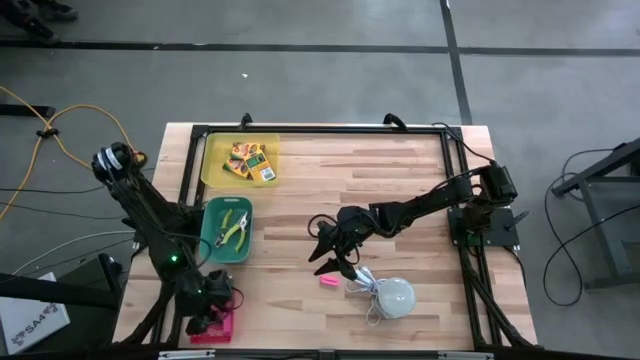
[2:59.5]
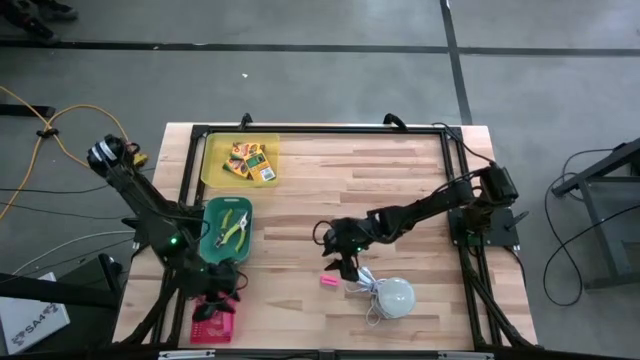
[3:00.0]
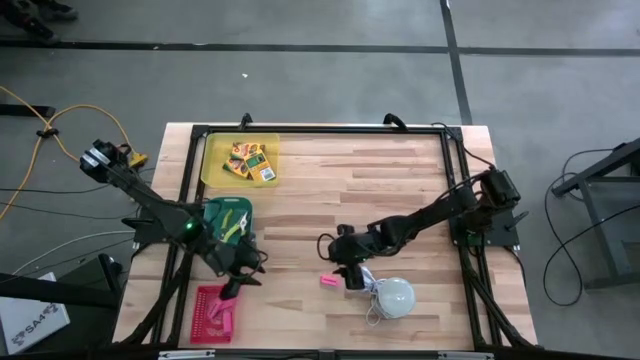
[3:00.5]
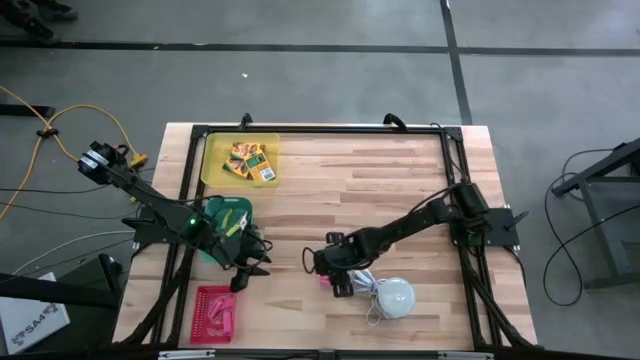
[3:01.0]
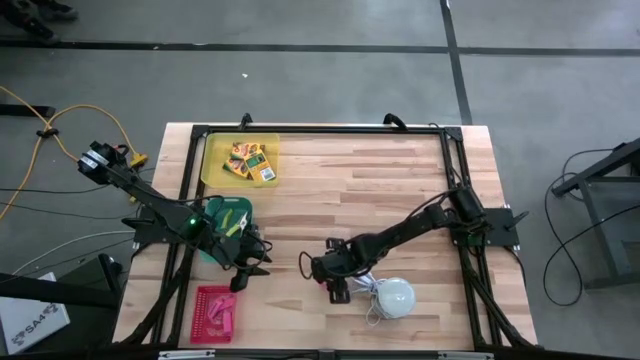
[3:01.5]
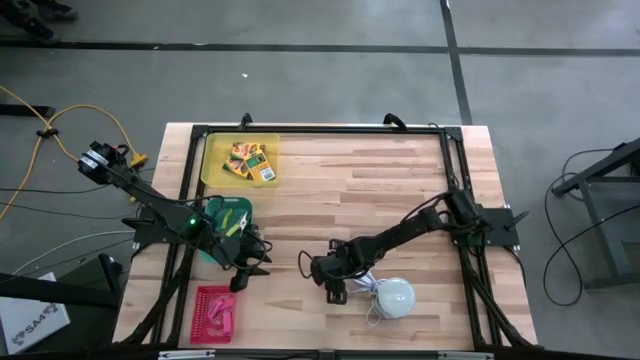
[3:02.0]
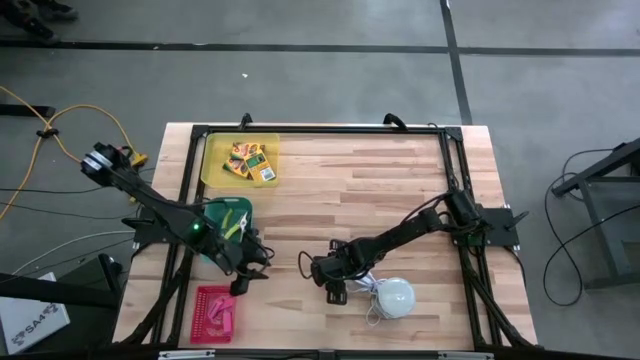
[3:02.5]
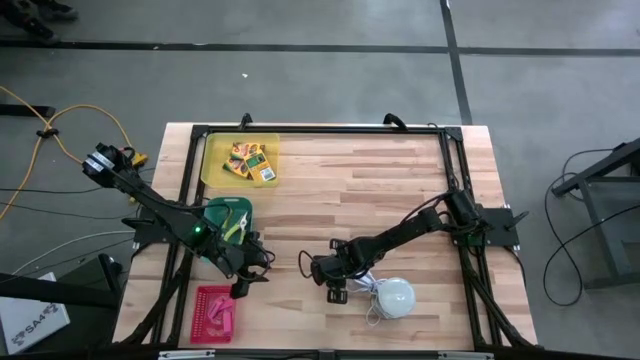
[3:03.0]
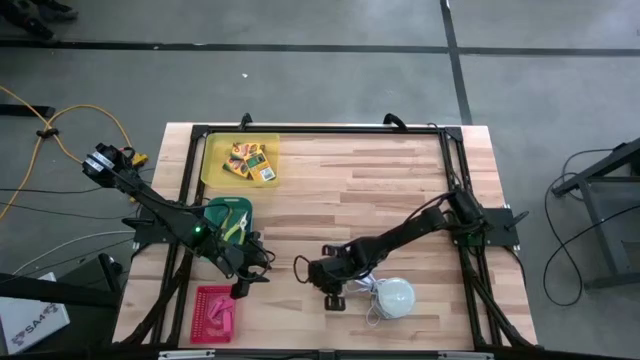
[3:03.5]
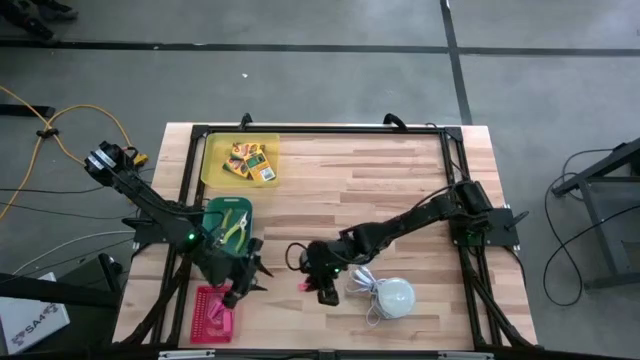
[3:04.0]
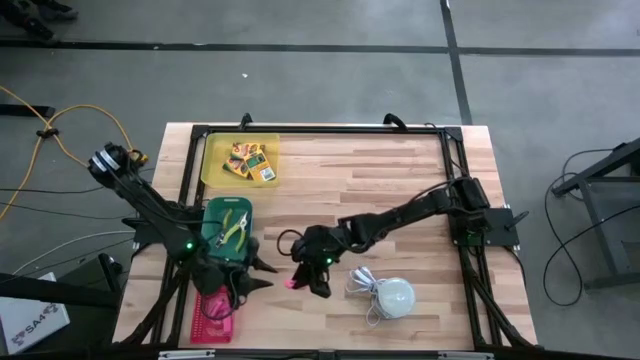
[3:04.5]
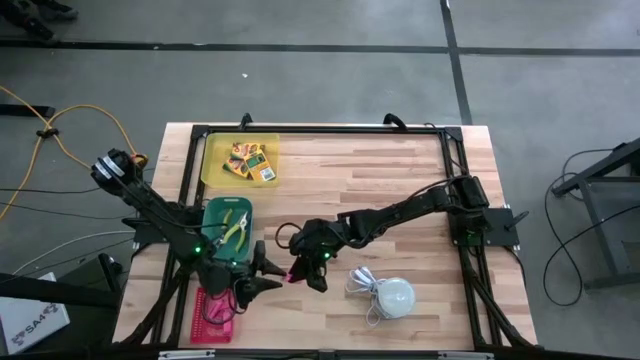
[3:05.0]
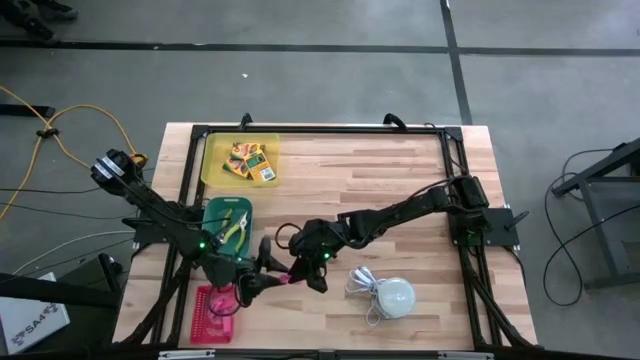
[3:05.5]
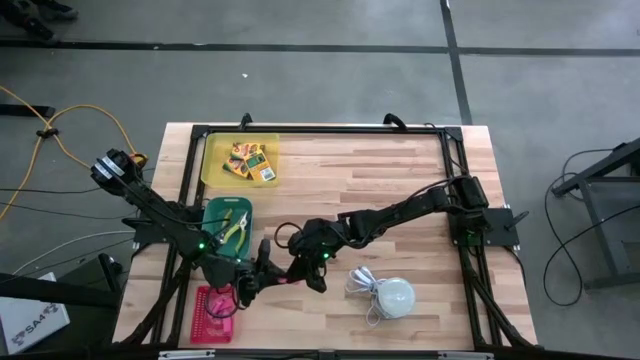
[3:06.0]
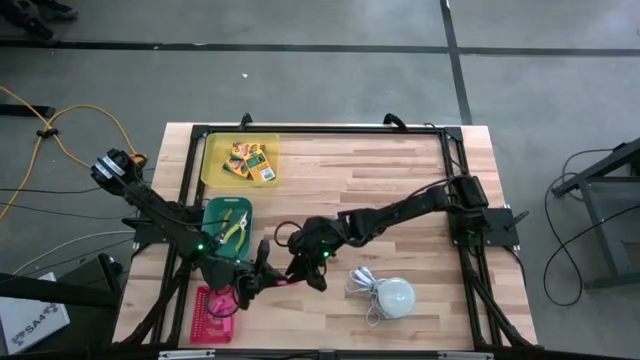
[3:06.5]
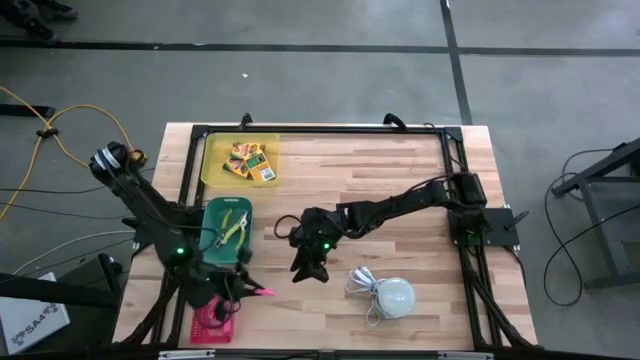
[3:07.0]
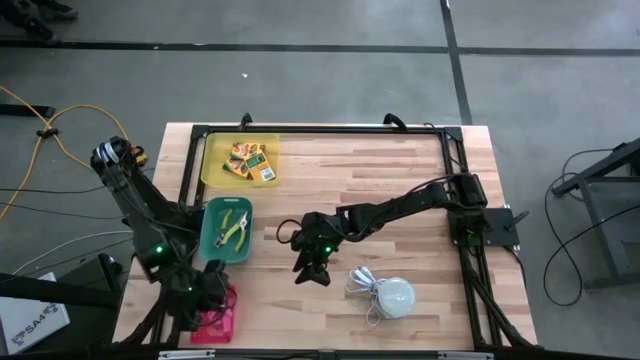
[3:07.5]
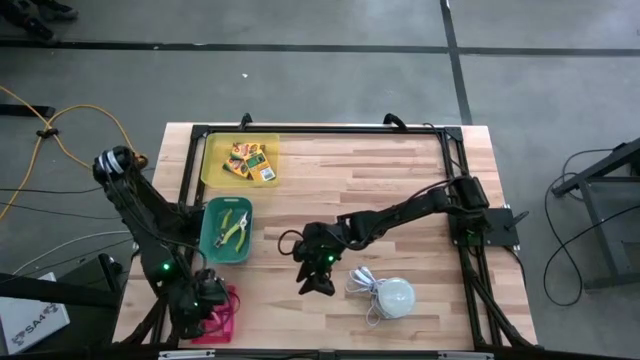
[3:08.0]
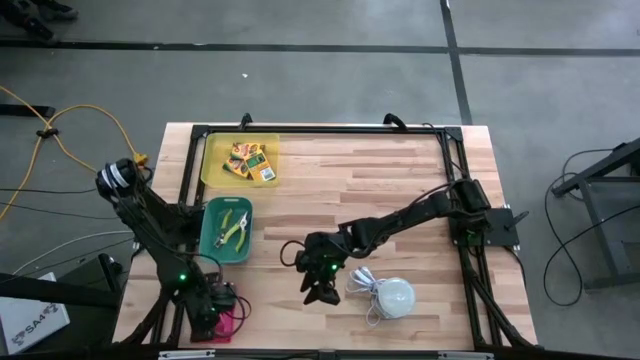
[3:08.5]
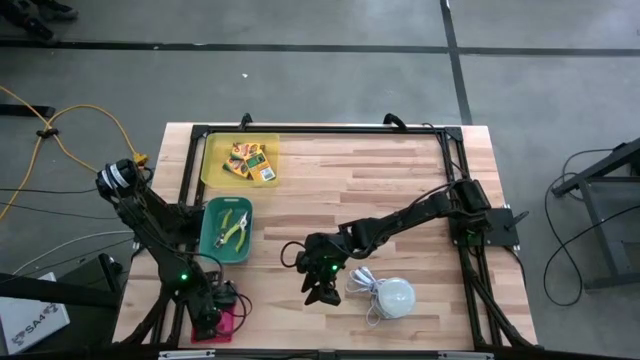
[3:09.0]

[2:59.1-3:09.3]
Task: Pick & Place School Supplies
Put the pink eraser into the red basket

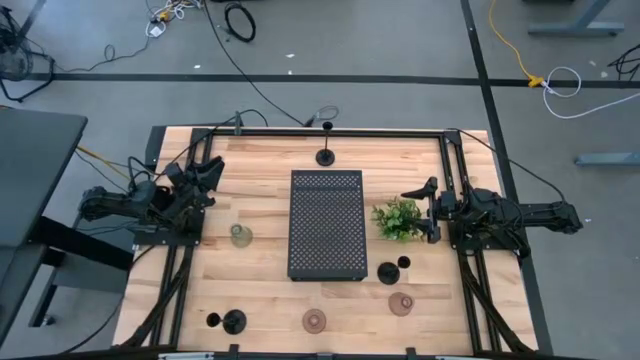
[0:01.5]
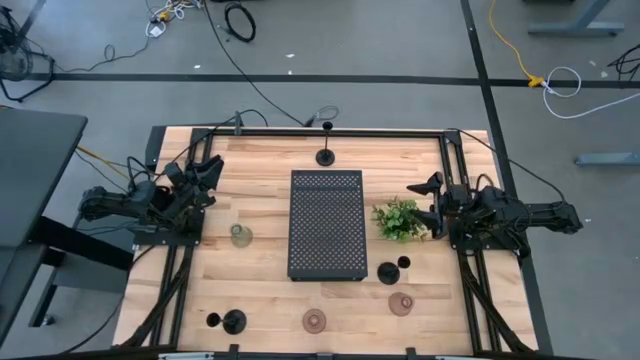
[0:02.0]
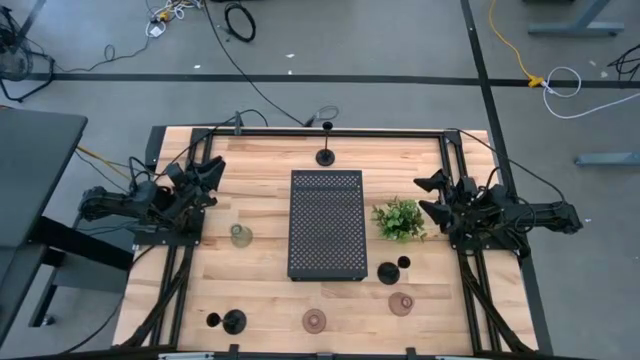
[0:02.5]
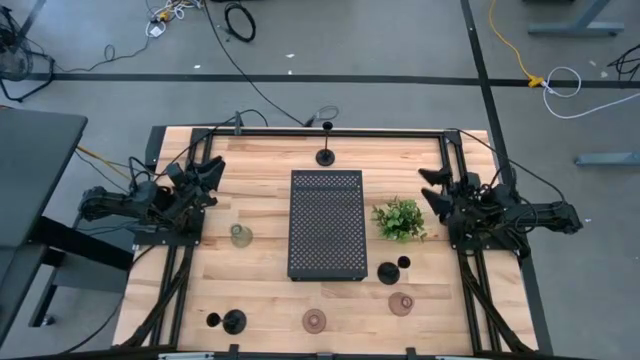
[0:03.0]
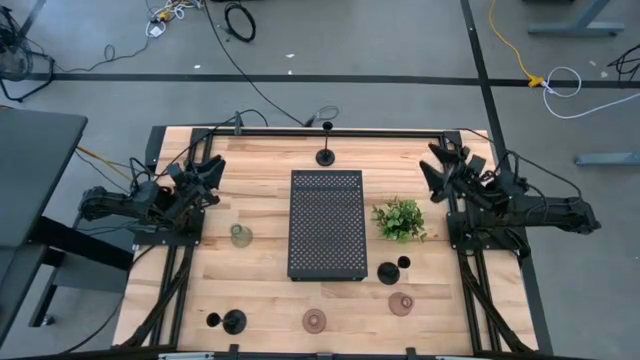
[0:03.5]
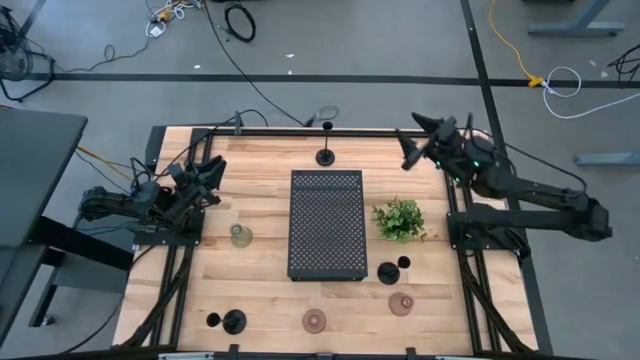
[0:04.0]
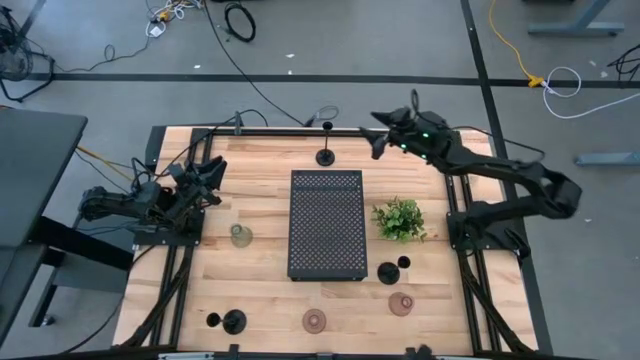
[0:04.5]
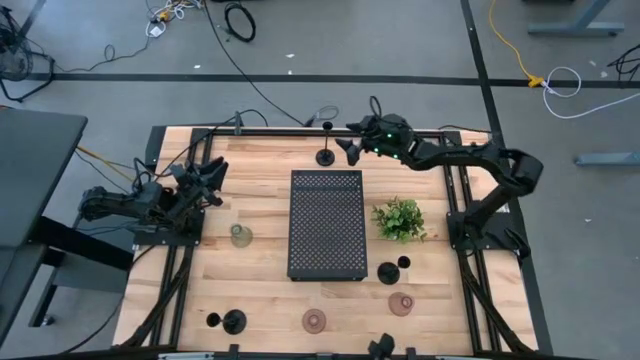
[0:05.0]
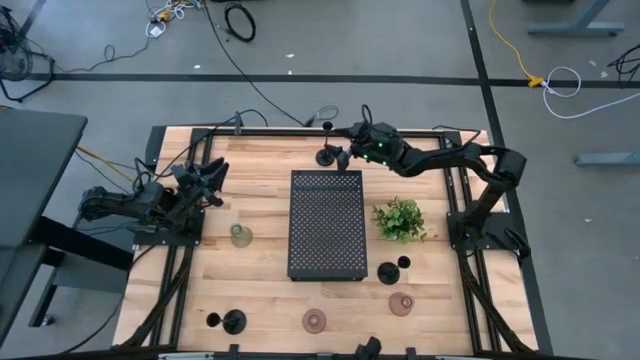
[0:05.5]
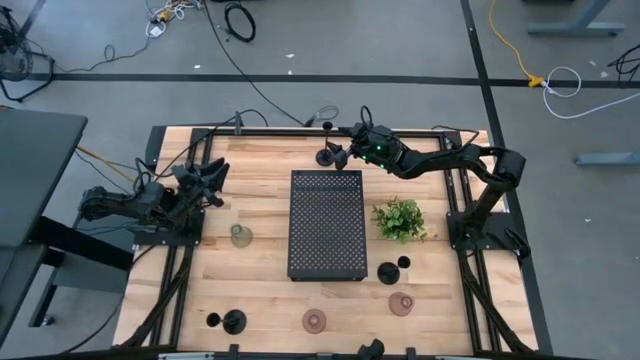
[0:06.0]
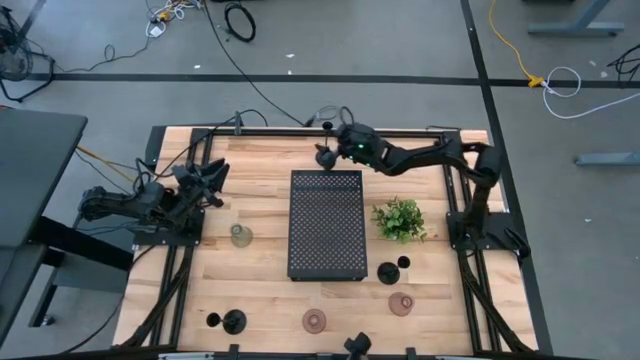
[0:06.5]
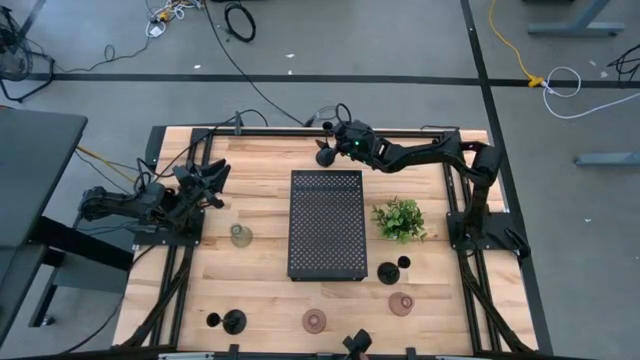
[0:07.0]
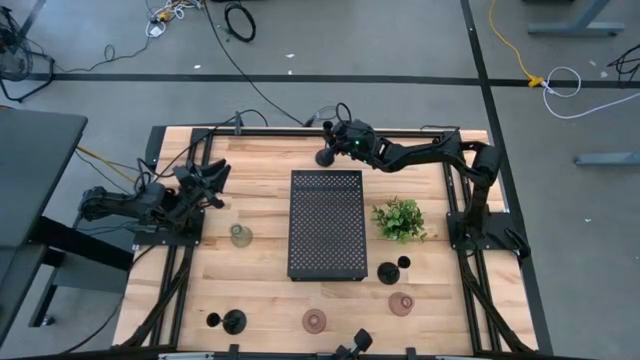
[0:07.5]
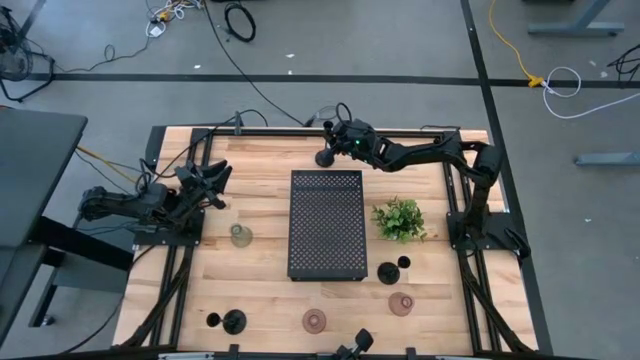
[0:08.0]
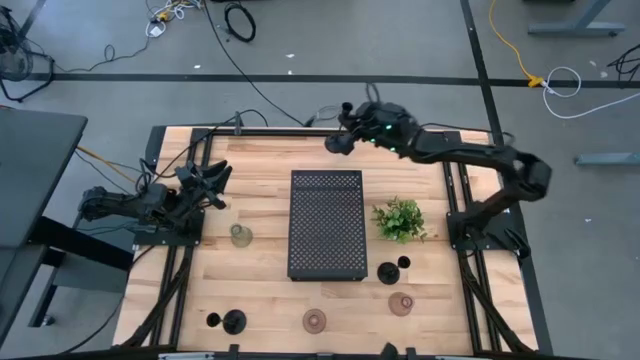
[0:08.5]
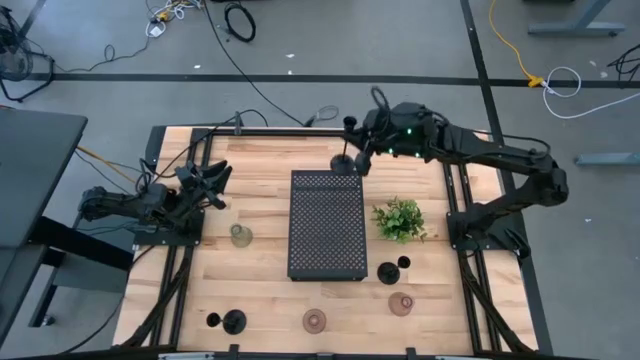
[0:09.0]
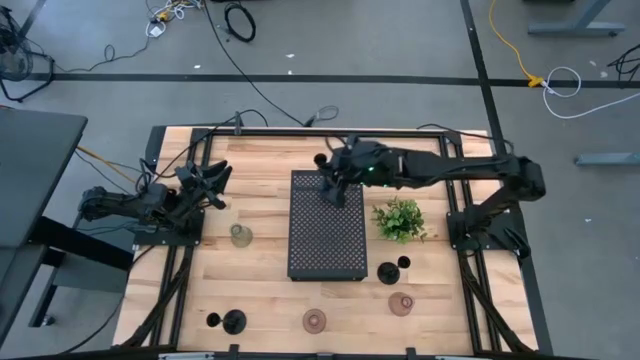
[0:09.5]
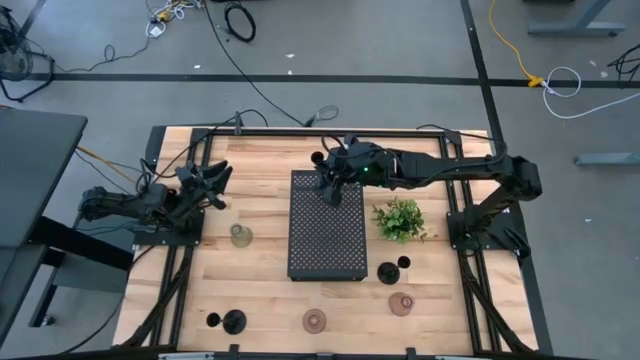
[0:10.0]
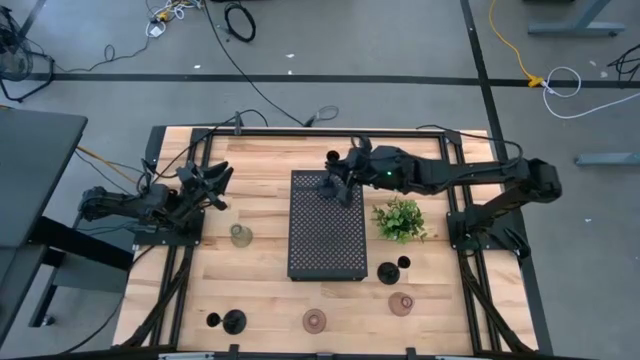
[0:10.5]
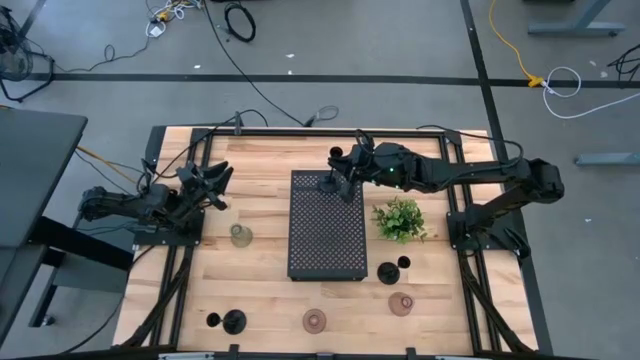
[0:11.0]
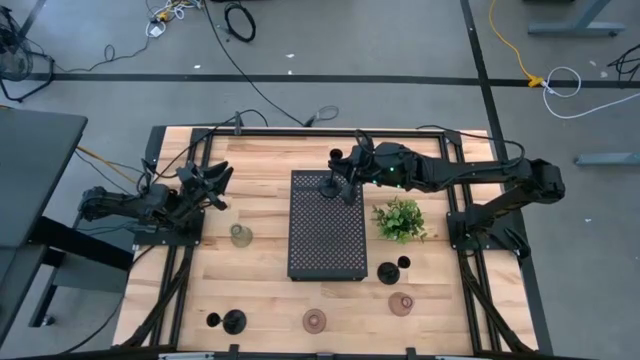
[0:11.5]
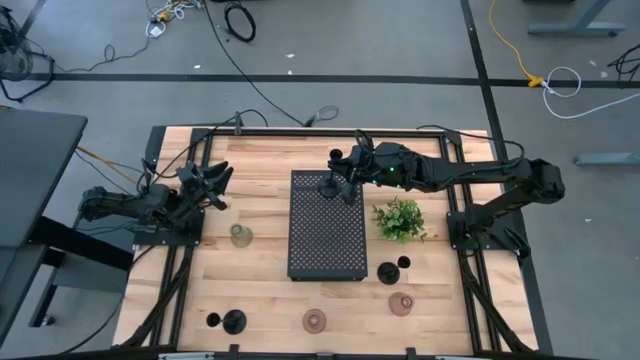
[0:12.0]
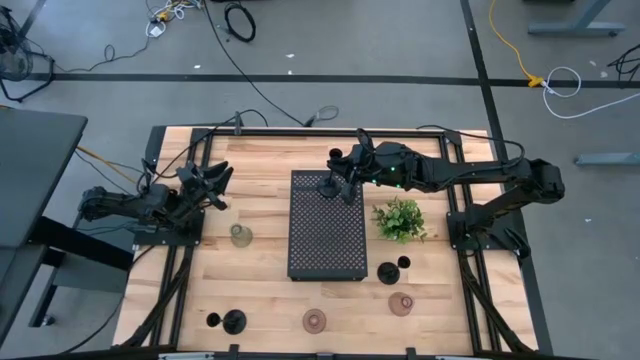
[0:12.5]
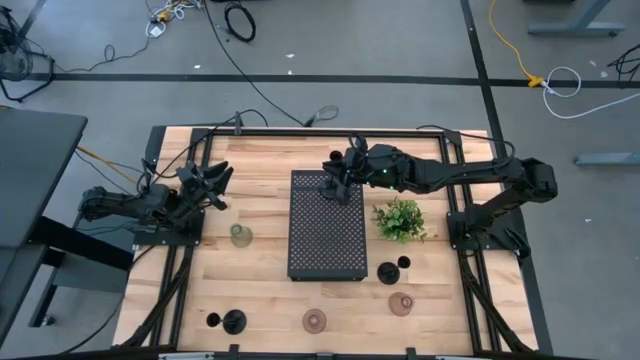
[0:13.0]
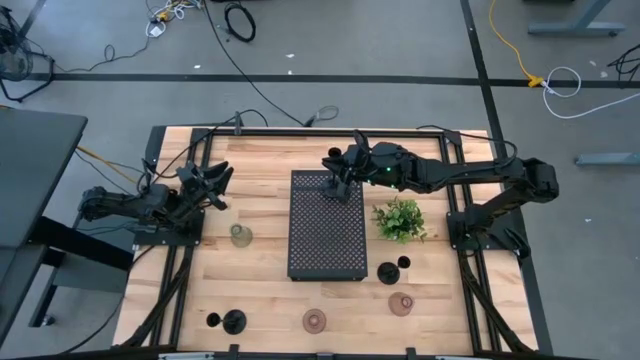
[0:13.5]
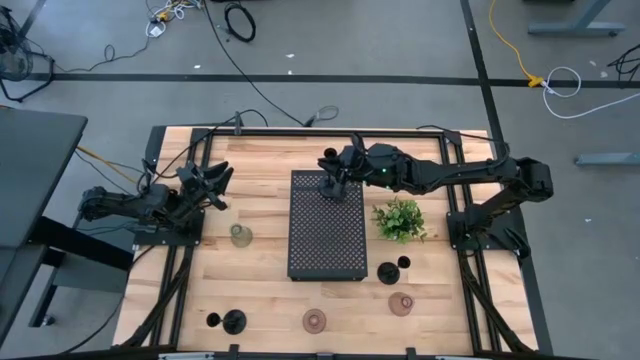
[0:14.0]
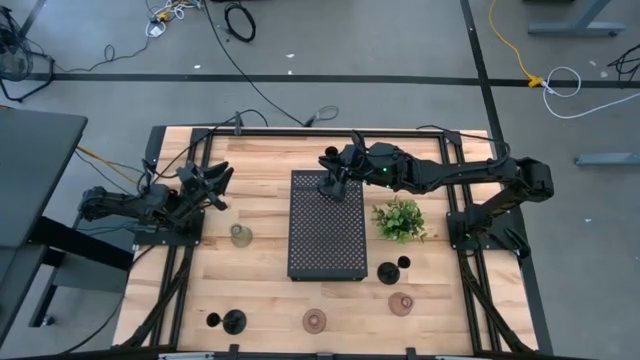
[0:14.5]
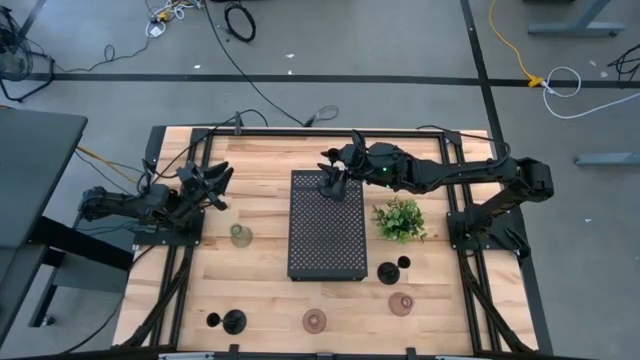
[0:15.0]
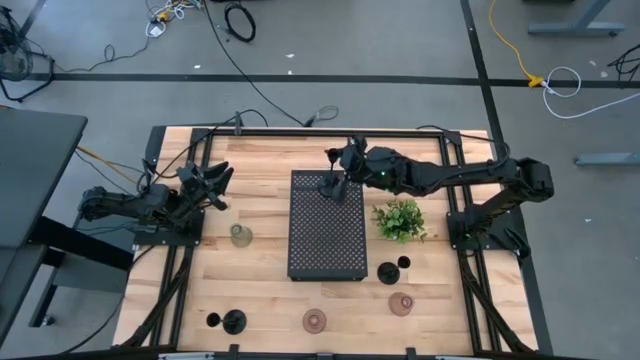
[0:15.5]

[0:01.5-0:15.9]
Task: Pick & Place candle stick holders
Put the top black candle holder on the shelf
